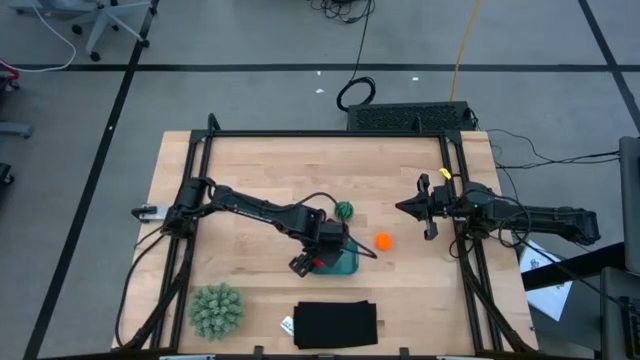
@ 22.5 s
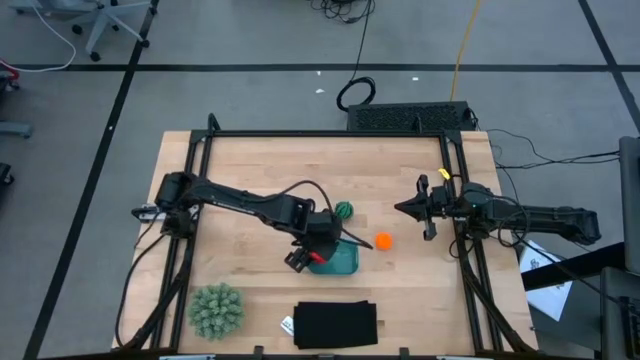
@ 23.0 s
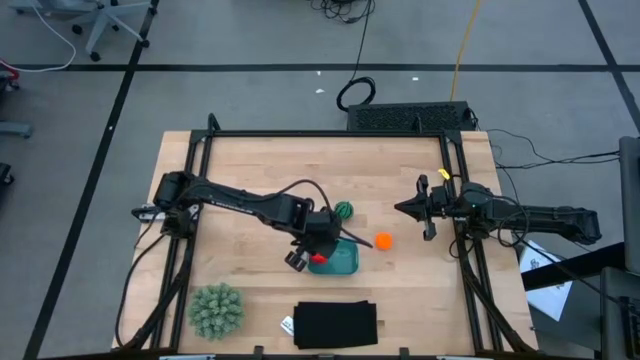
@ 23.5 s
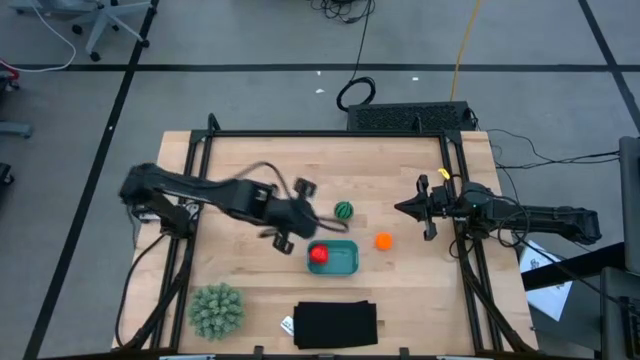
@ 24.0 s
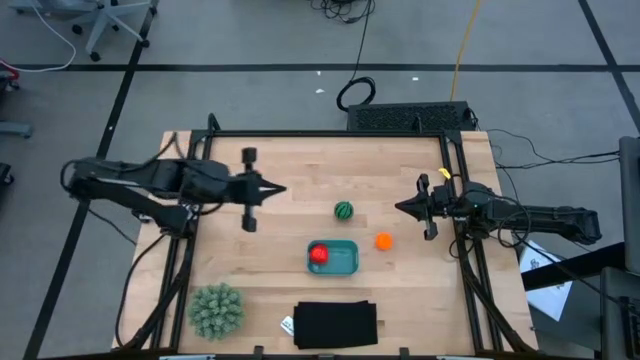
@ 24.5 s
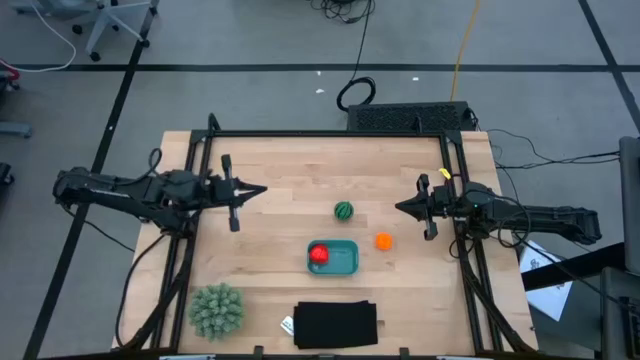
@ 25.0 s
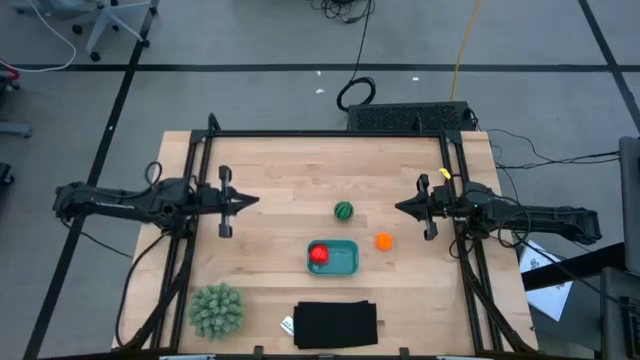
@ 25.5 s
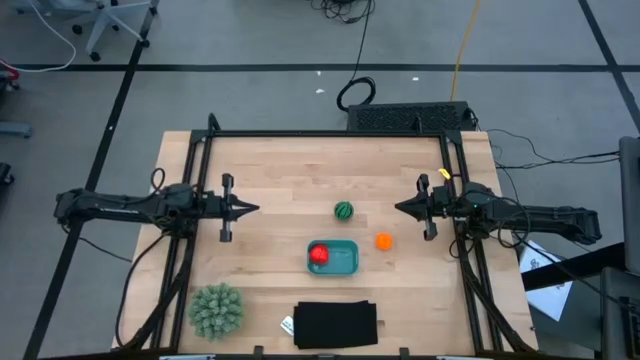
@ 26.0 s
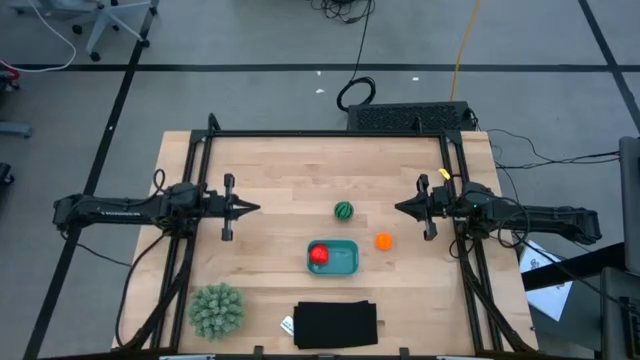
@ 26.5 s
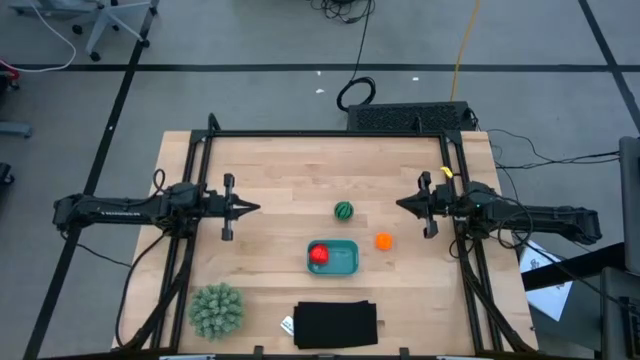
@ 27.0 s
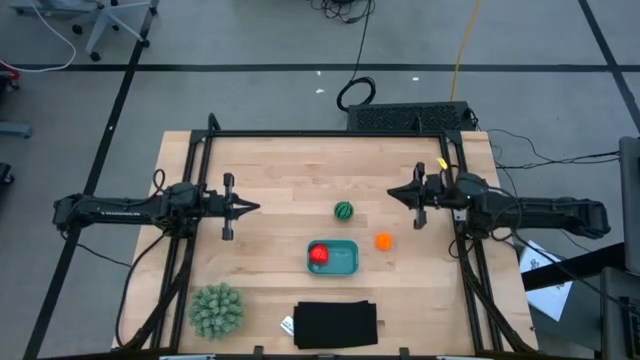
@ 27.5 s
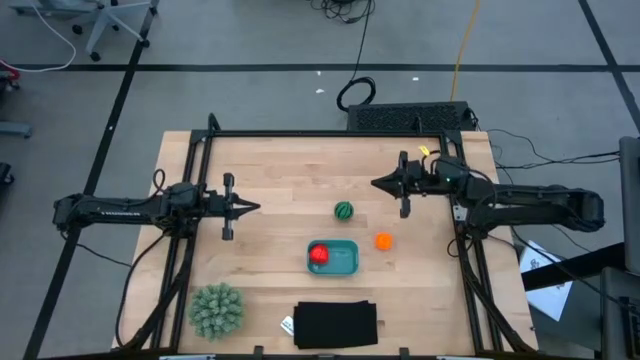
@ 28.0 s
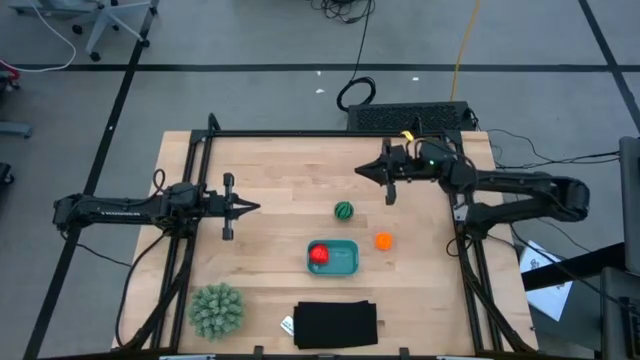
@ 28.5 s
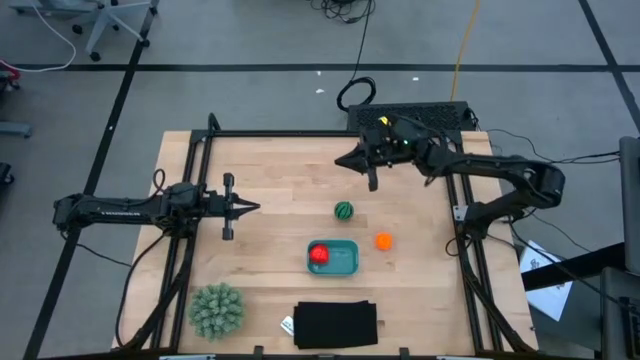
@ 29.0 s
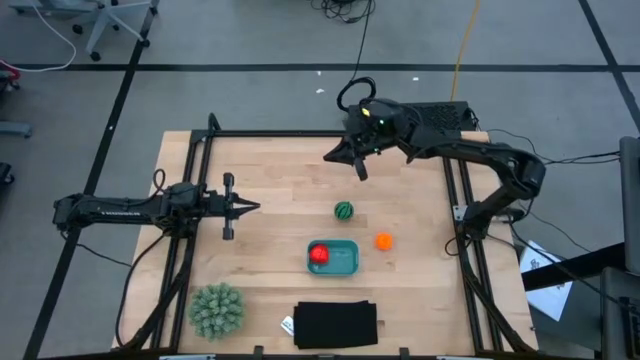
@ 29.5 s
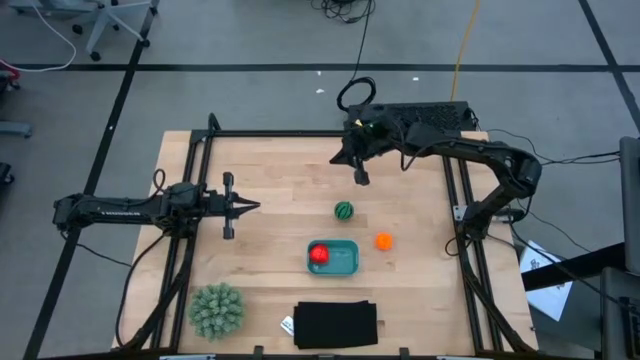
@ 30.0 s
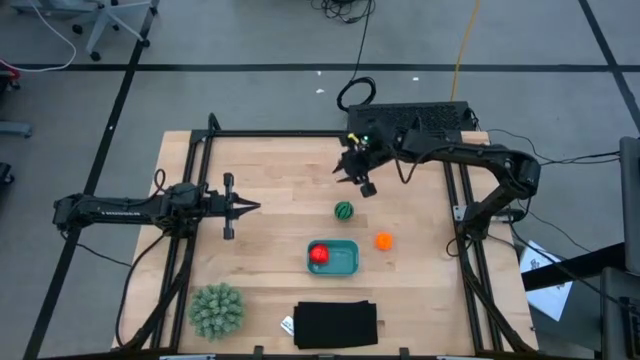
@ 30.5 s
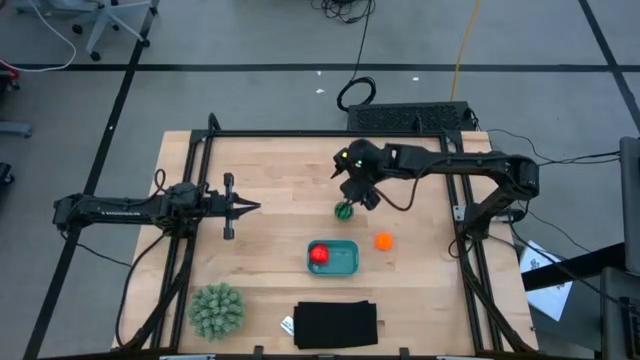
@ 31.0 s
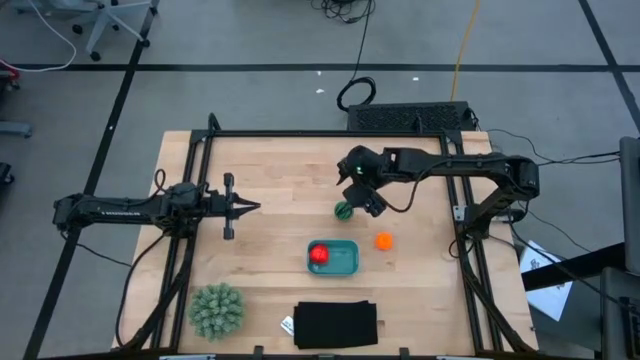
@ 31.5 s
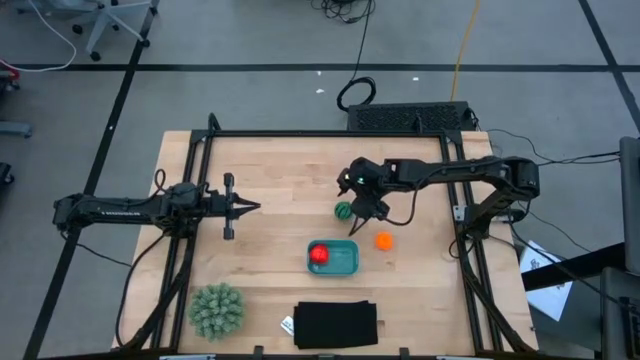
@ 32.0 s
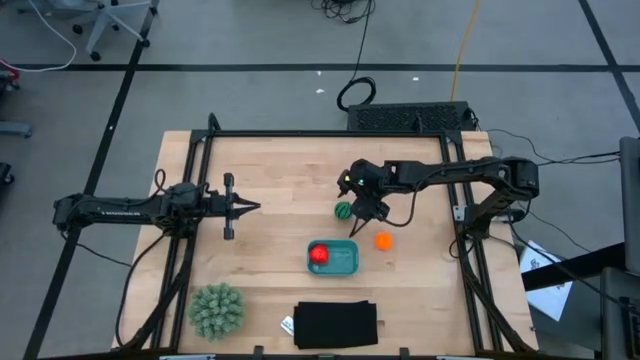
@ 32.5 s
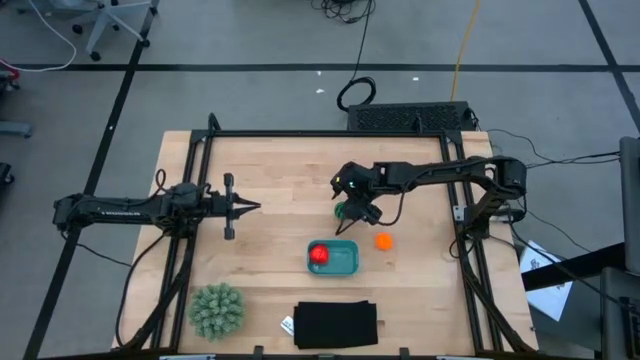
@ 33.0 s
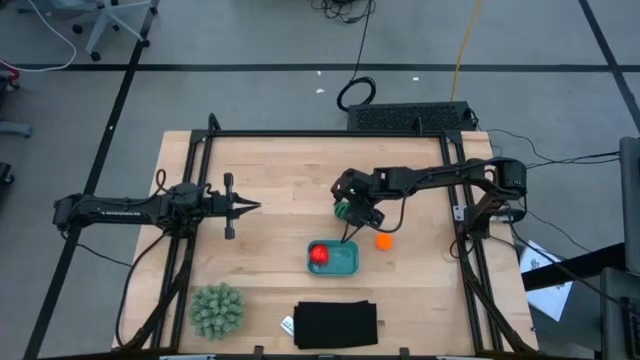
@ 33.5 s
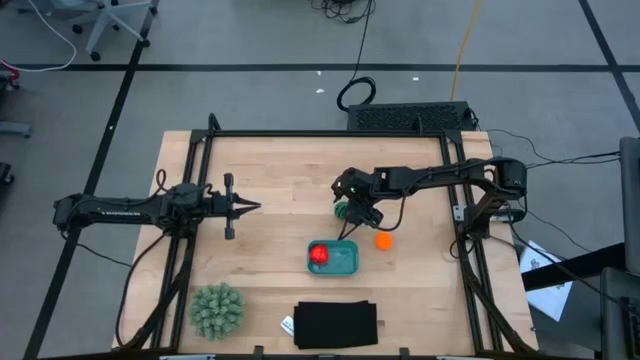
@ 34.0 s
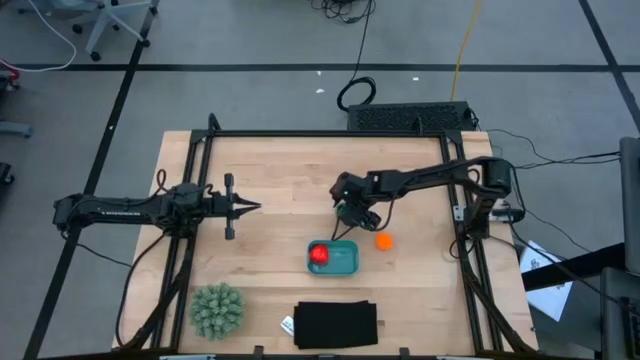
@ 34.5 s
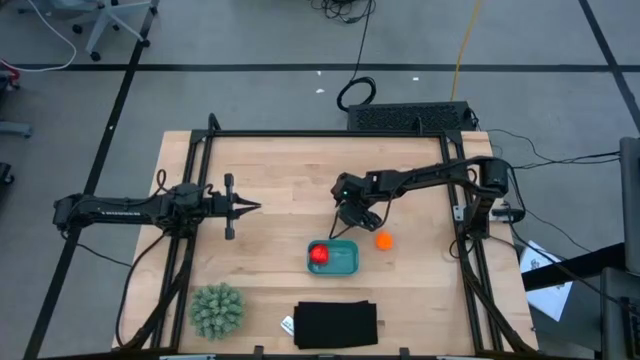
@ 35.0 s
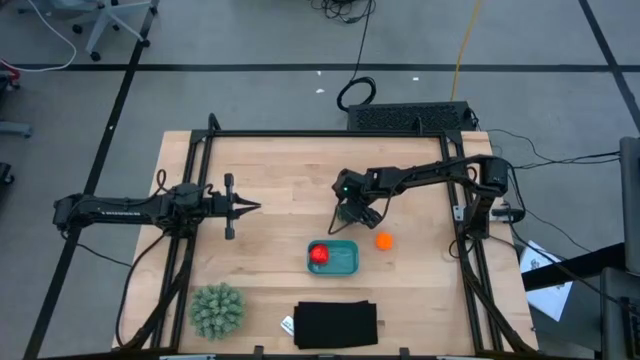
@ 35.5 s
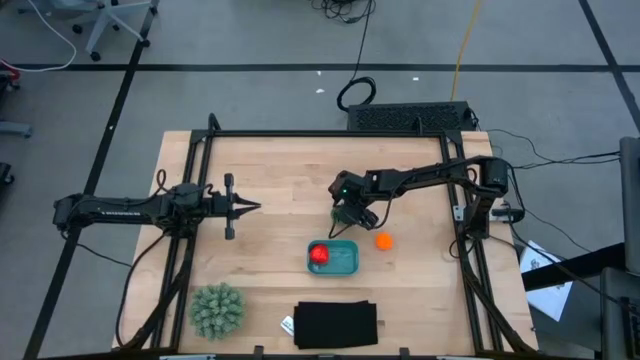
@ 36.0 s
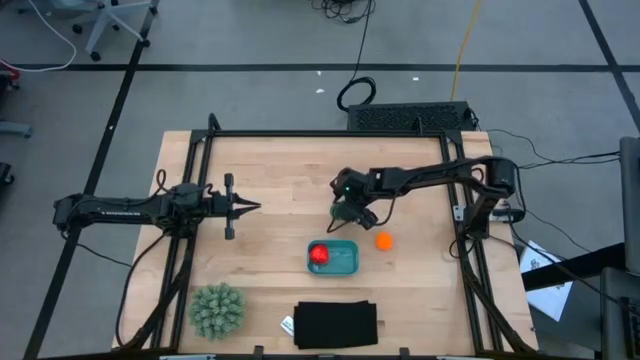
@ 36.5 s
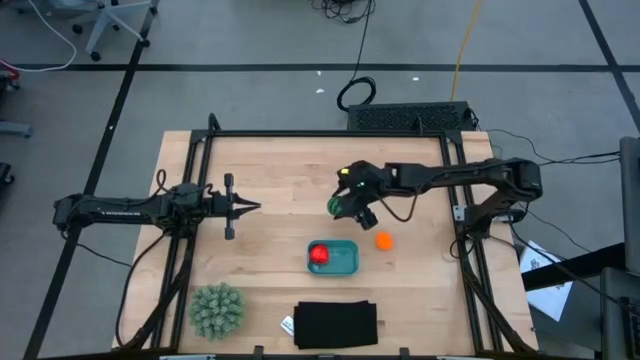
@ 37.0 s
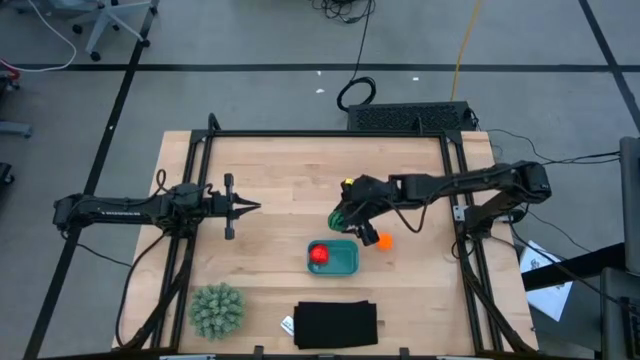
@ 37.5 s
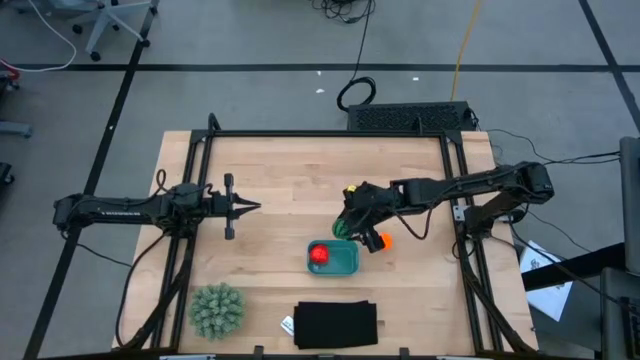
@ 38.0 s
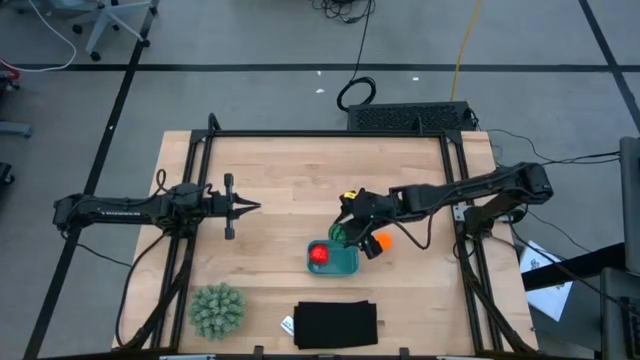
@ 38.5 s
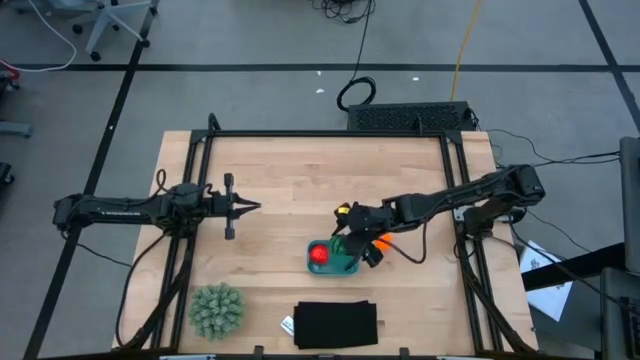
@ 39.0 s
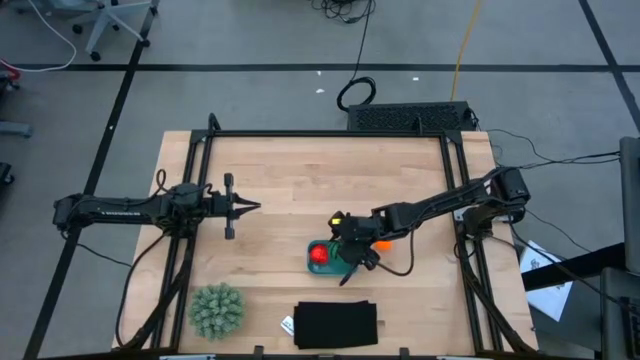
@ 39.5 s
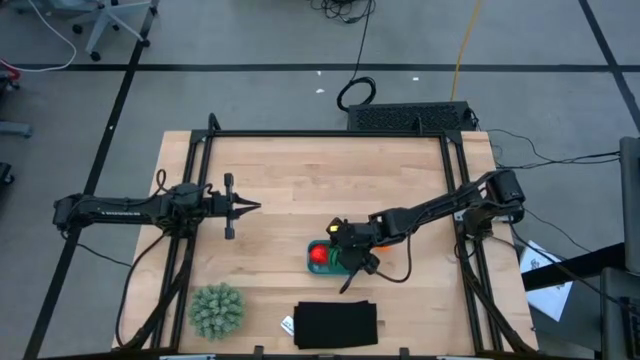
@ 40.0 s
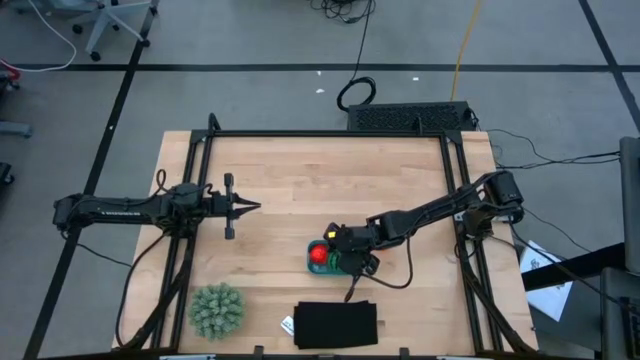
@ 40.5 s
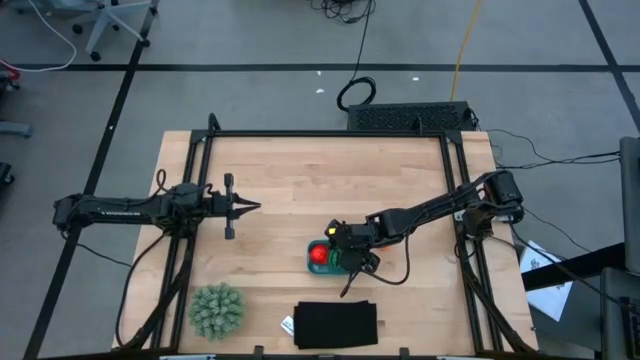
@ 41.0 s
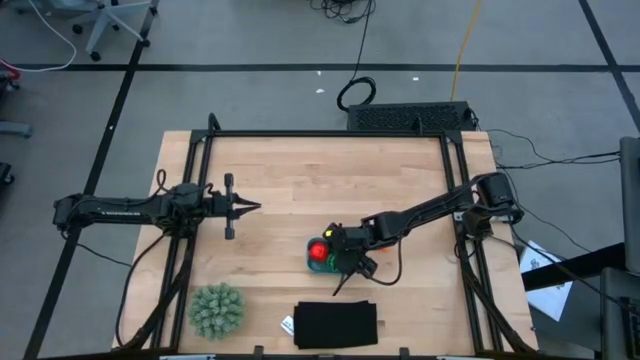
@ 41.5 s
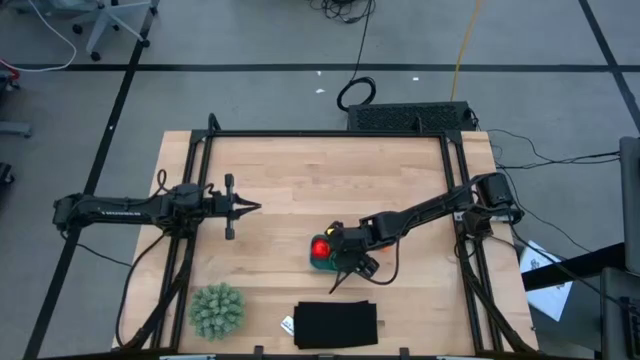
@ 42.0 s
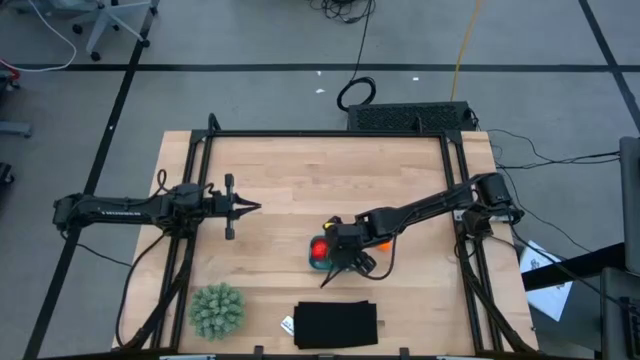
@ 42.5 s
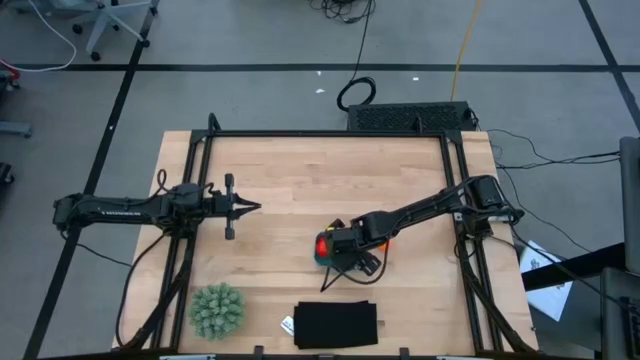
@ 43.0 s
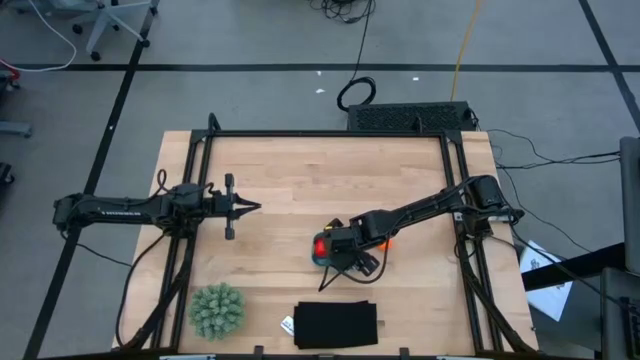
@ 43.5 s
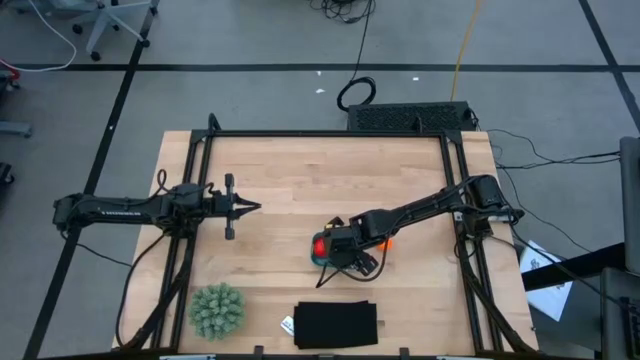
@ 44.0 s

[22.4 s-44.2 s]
Task: Pick and placing Produce into tupperware
Put the green watermelon into the blue bin
